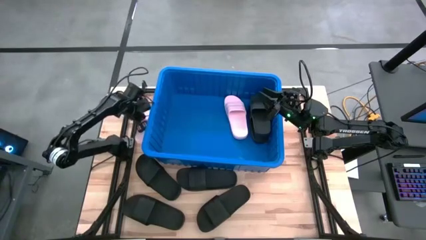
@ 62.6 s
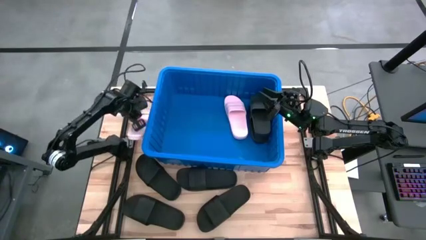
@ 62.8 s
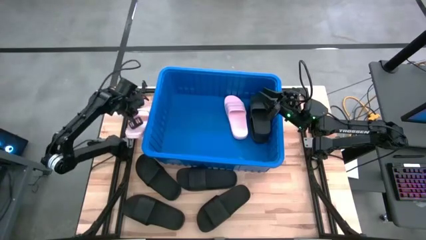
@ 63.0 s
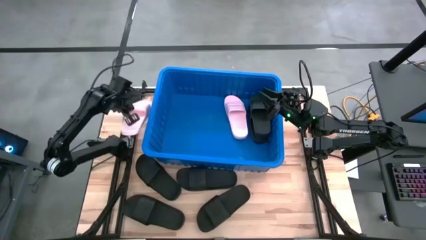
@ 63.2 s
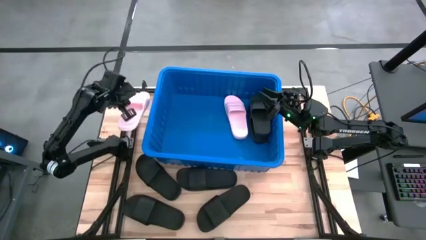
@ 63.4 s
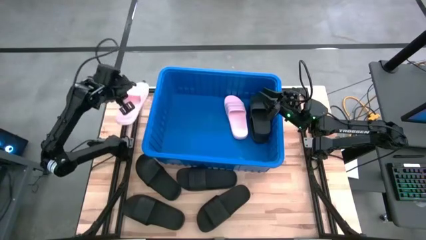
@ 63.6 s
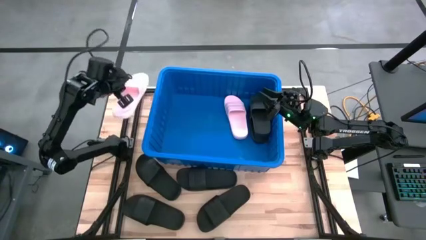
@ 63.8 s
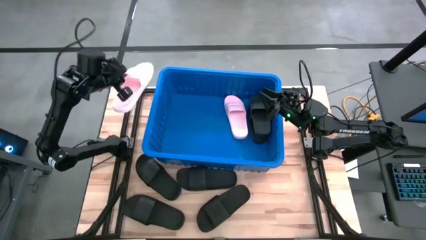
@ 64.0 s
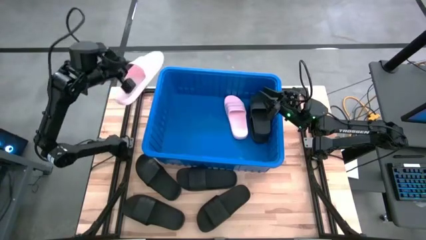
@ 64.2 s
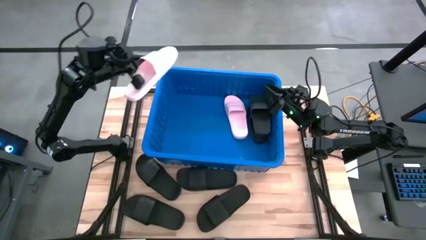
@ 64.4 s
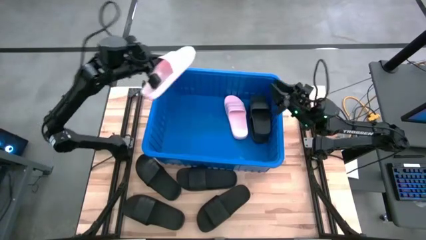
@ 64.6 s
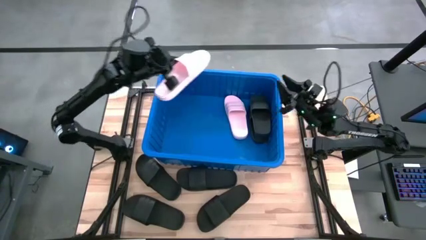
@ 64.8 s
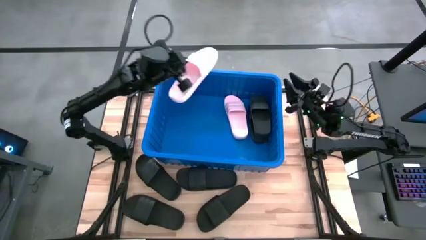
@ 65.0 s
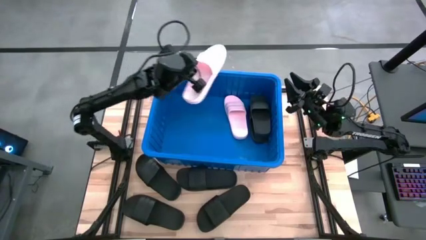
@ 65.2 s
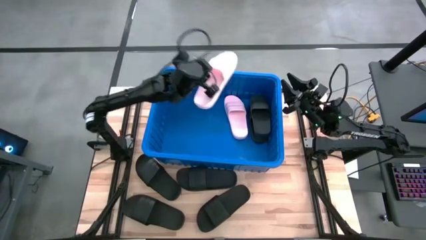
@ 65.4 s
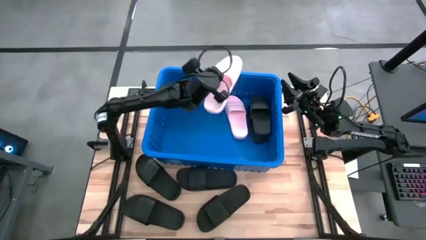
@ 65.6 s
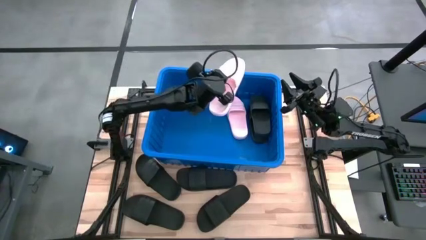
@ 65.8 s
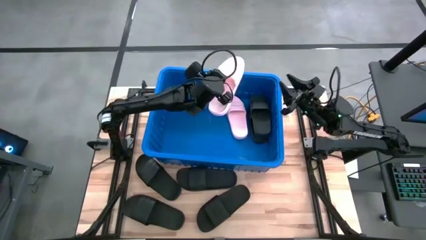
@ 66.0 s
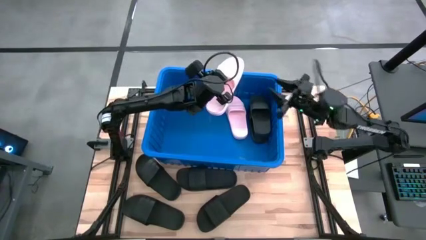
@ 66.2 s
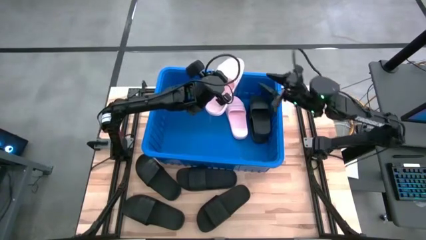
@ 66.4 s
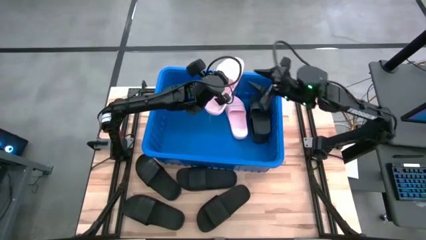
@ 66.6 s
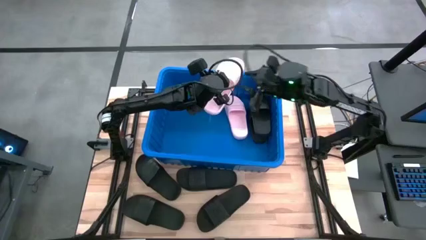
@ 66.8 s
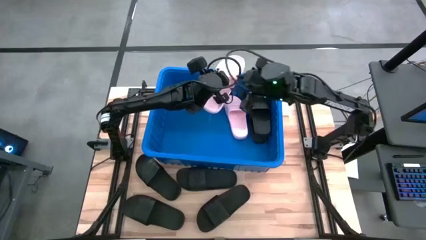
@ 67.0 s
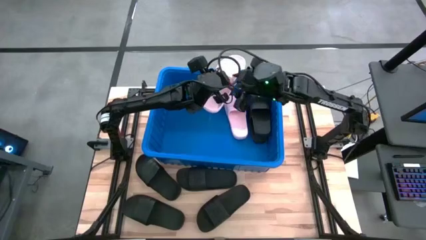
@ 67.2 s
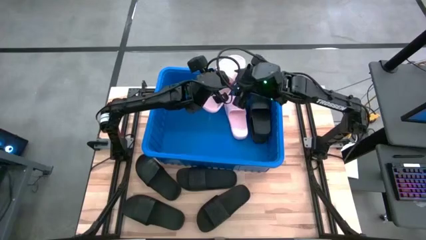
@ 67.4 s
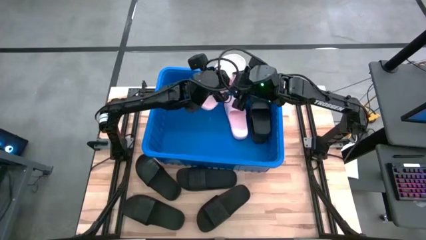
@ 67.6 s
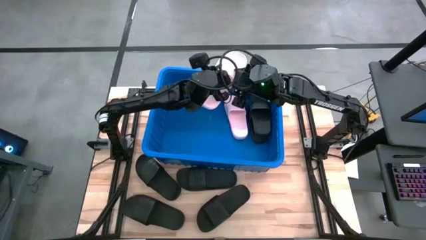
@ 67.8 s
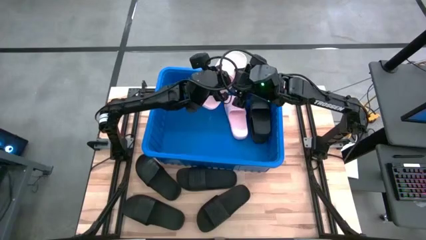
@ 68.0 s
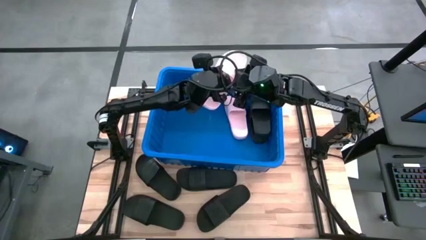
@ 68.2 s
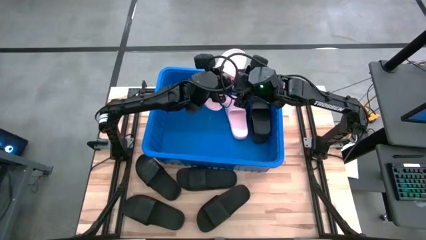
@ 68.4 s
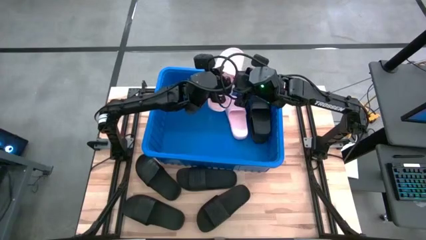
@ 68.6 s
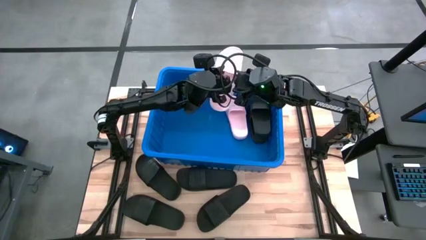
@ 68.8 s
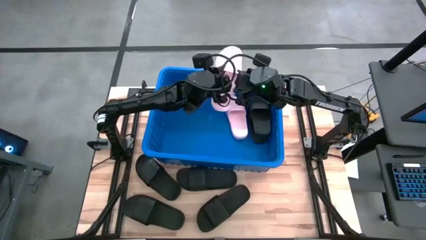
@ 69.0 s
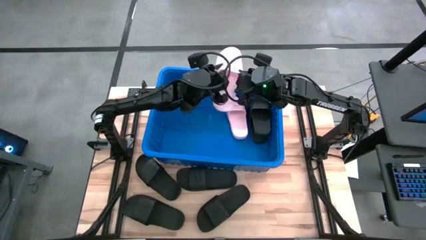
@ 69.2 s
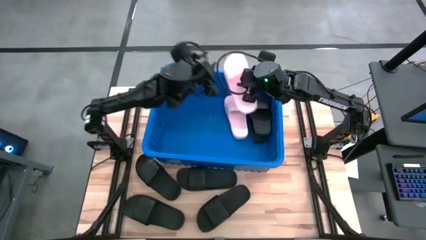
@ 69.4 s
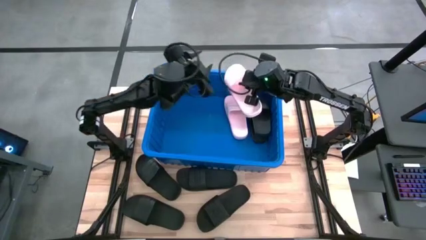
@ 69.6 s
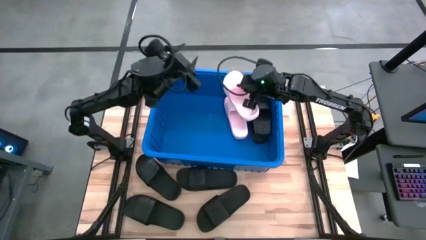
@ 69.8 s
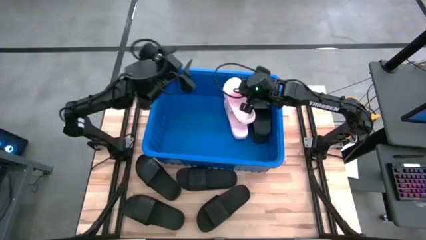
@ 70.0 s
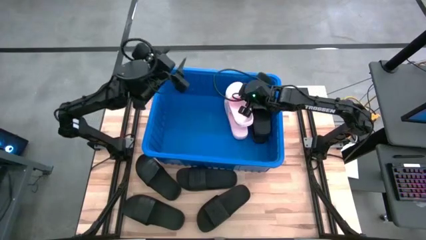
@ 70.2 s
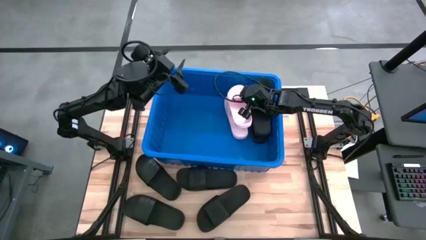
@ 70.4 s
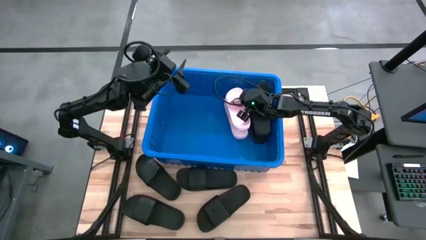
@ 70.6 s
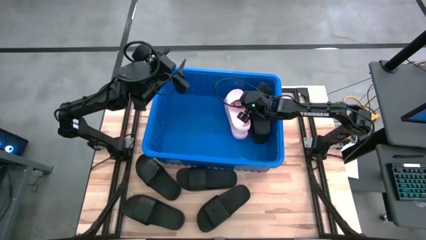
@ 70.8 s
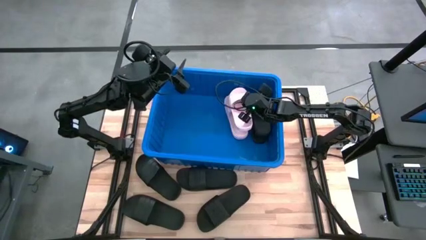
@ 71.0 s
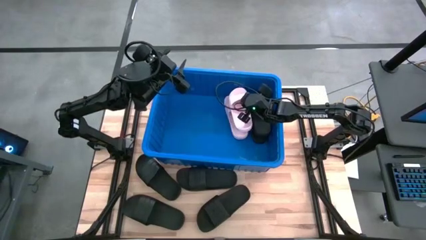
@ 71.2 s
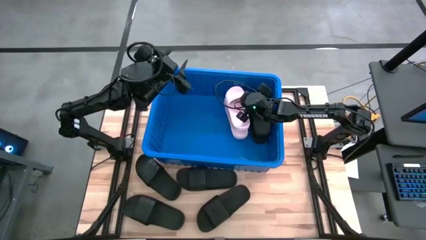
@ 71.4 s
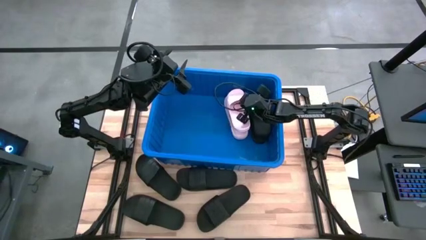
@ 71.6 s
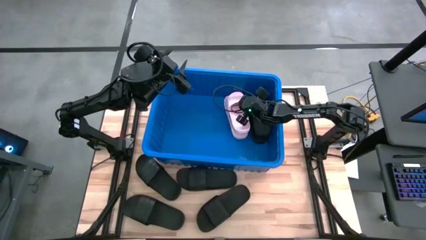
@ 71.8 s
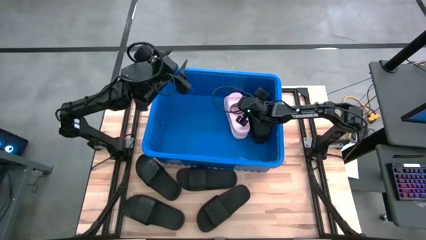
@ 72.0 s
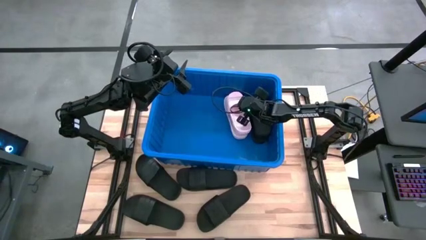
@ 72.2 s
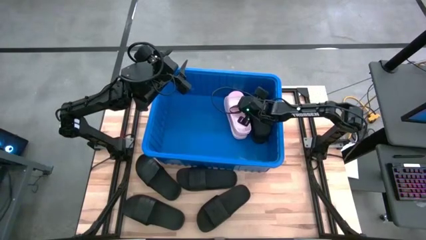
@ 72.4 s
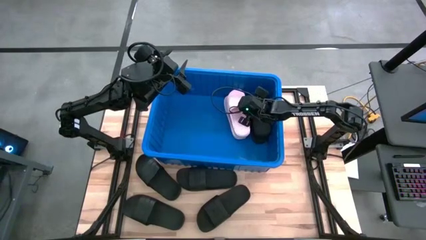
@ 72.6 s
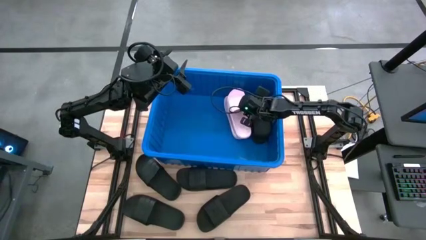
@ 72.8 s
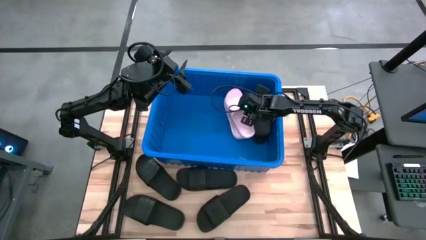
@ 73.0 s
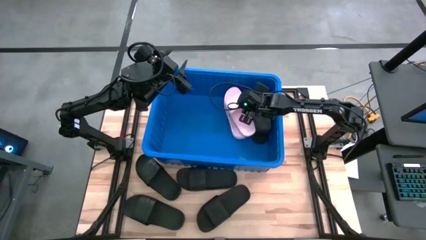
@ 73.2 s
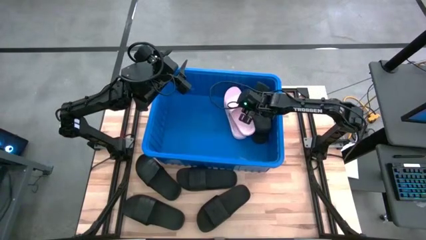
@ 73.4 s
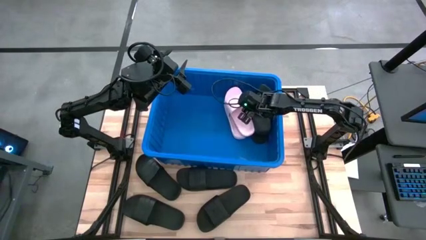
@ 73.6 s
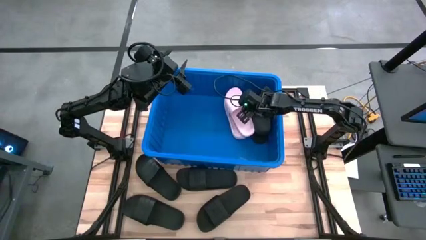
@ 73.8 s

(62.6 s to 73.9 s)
Task: Pick and place slides into bin
Put the pink slide into the blue bin
